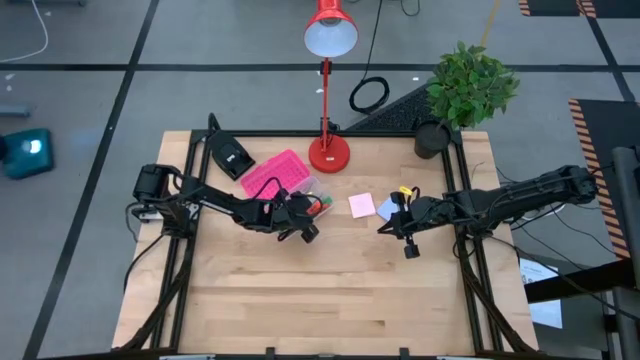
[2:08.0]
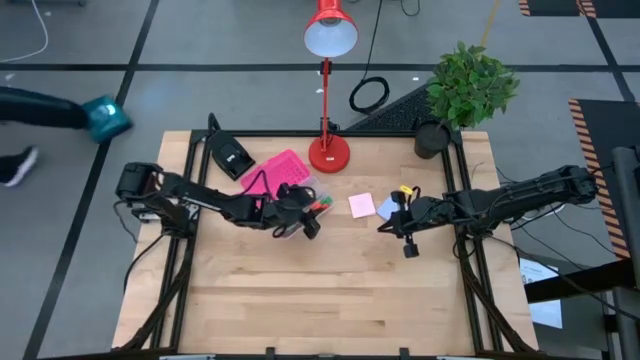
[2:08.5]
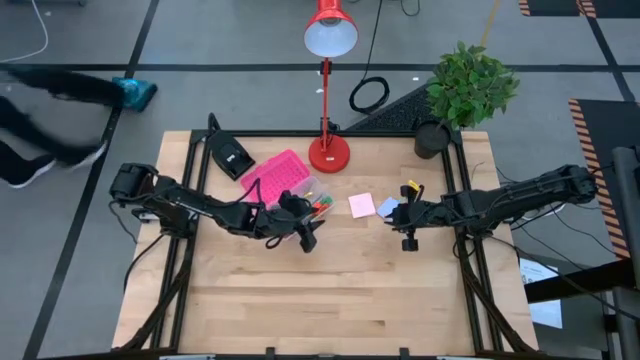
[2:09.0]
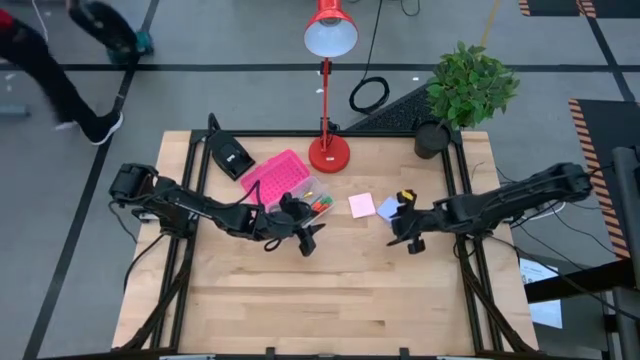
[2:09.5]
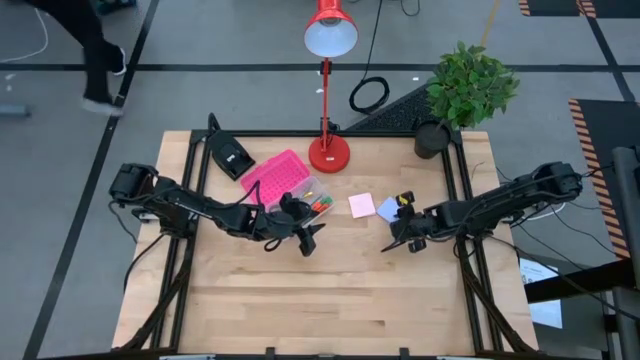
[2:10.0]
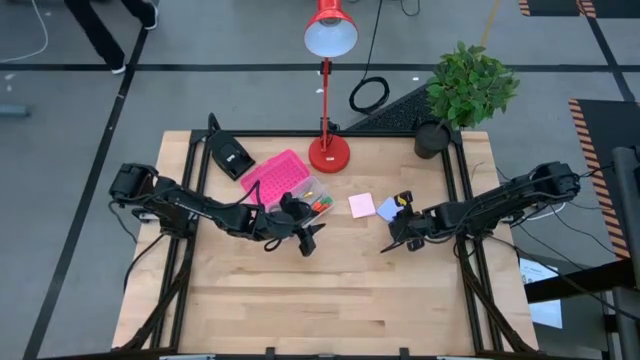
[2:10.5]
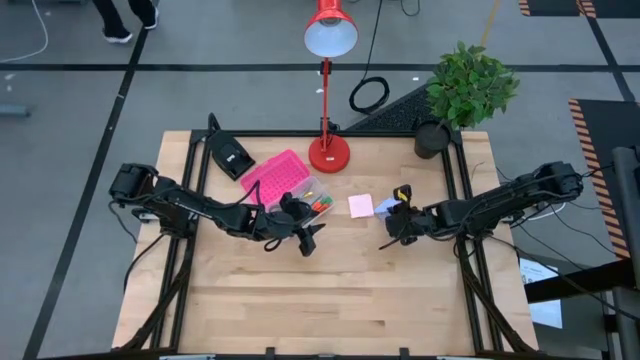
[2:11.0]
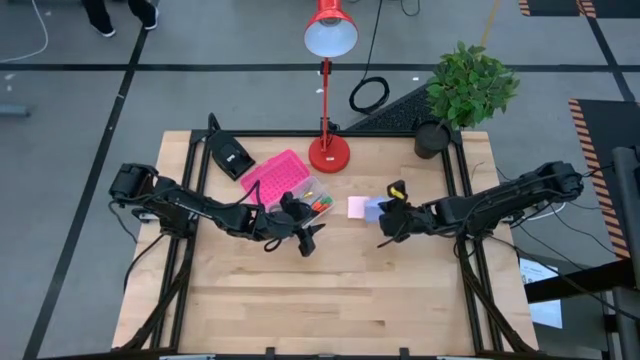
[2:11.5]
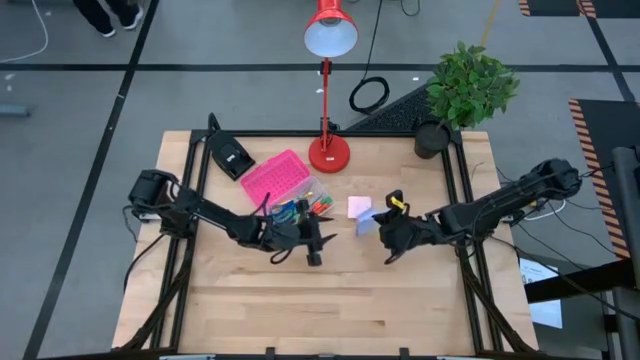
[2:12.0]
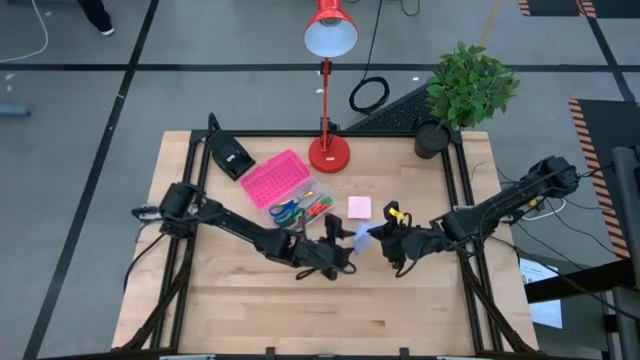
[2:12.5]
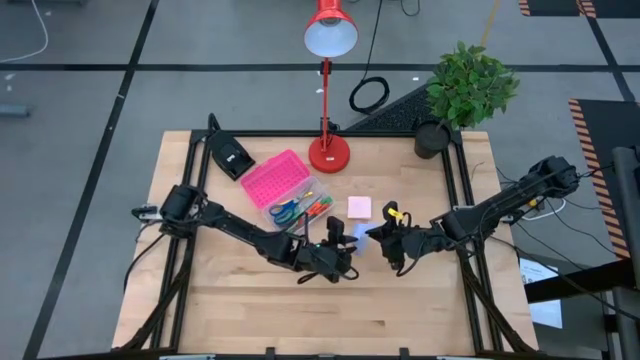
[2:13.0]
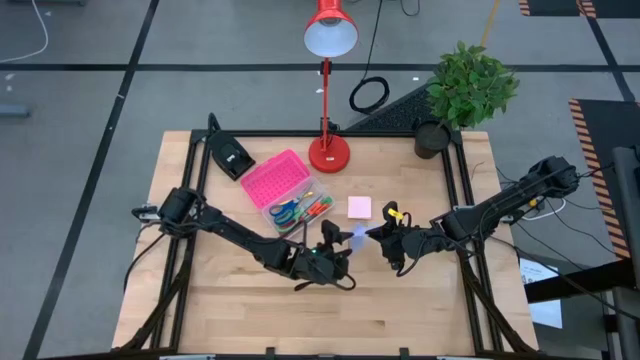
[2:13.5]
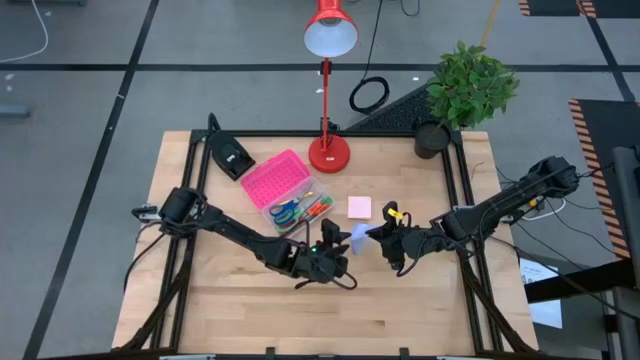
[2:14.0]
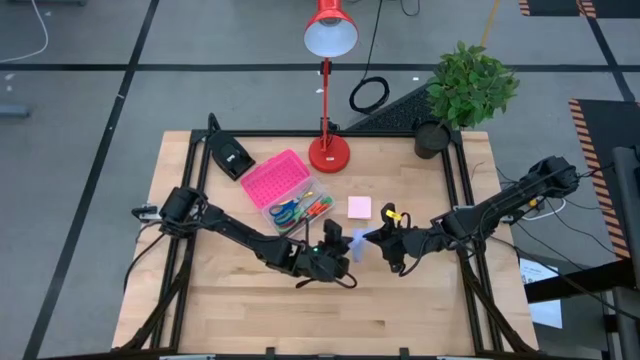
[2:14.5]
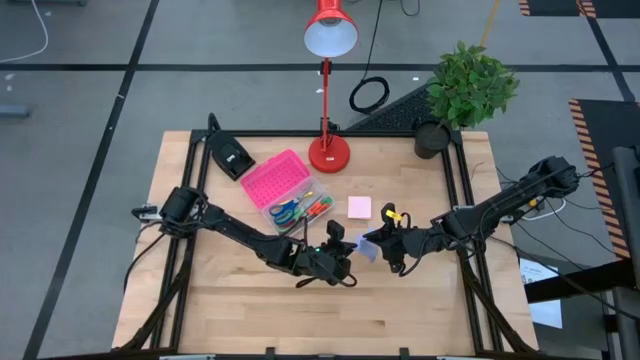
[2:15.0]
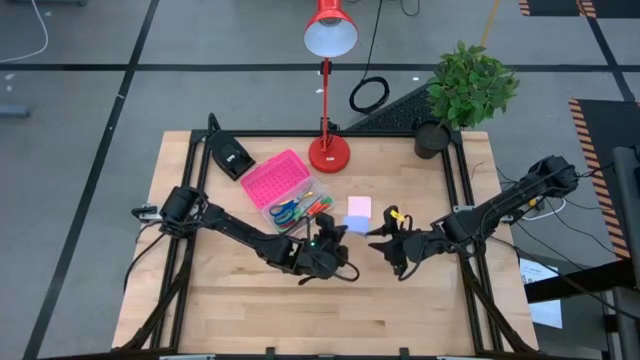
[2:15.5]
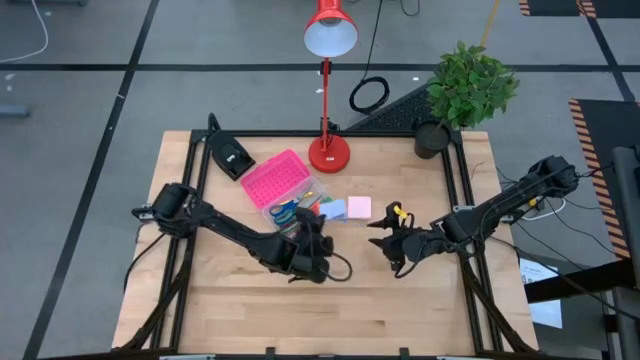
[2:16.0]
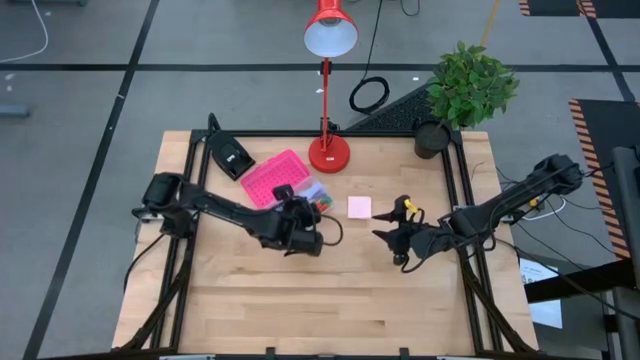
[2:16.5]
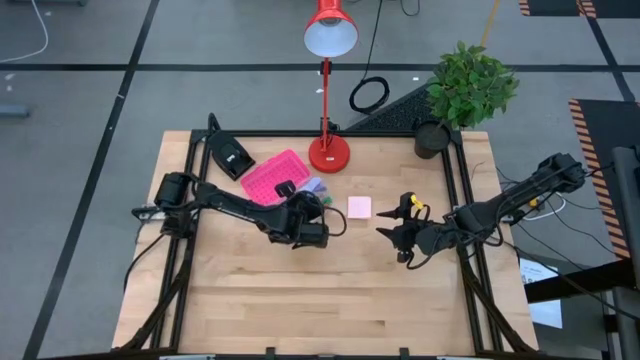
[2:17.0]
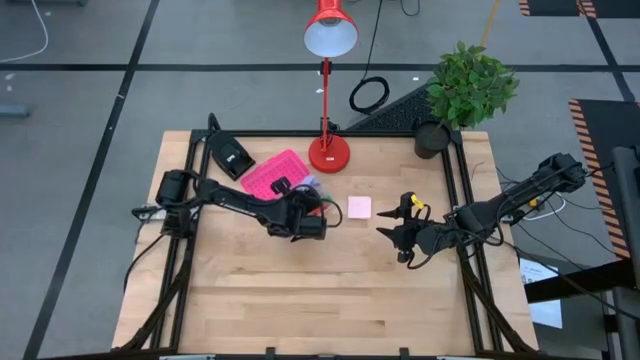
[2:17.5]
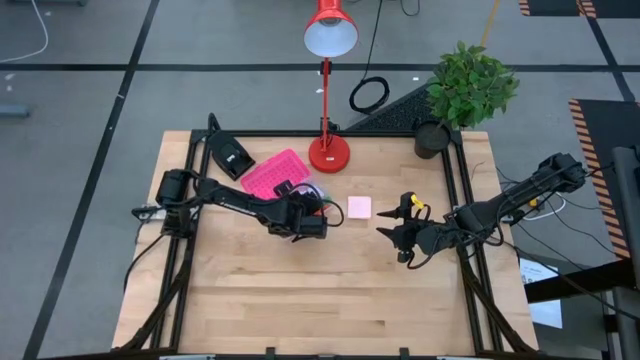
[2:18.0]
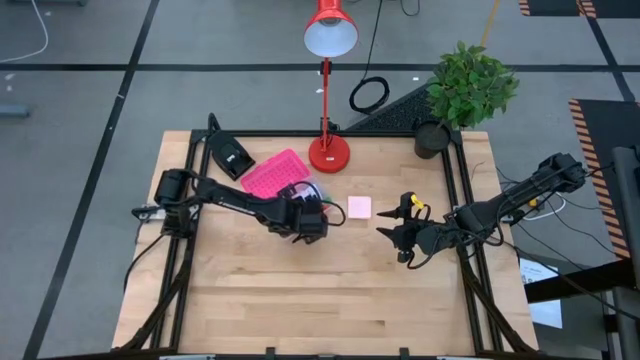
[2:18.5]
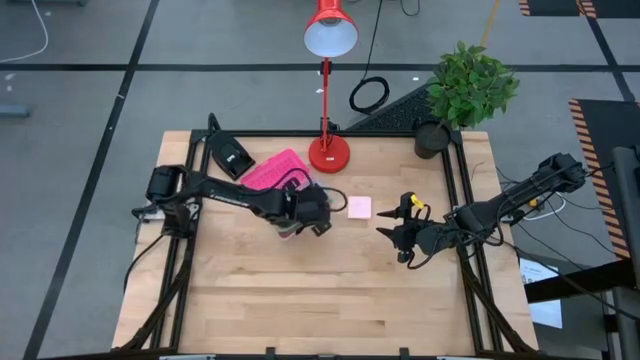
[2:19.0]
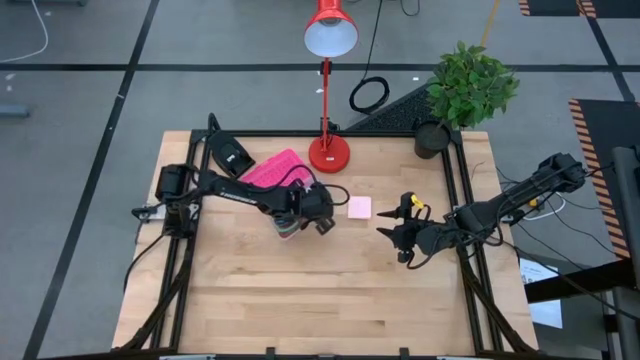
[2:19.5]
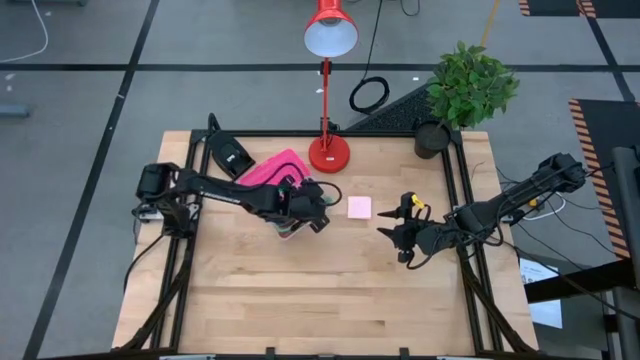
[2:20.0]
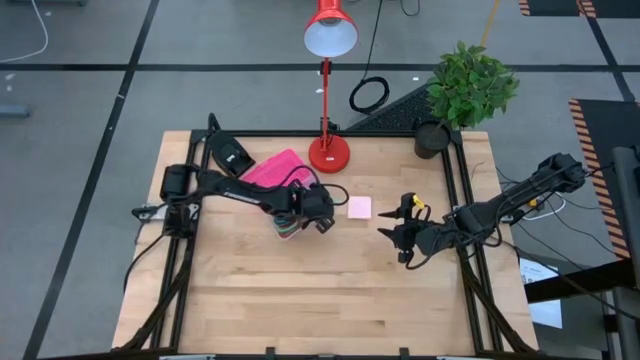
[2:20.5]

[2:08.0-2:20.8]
Task: Pack school essentials
Put the light blue sticky note into the supply box

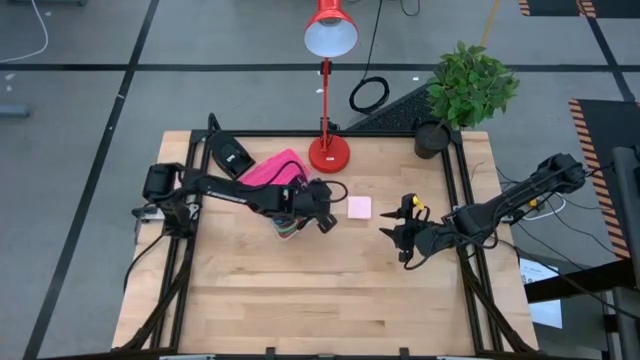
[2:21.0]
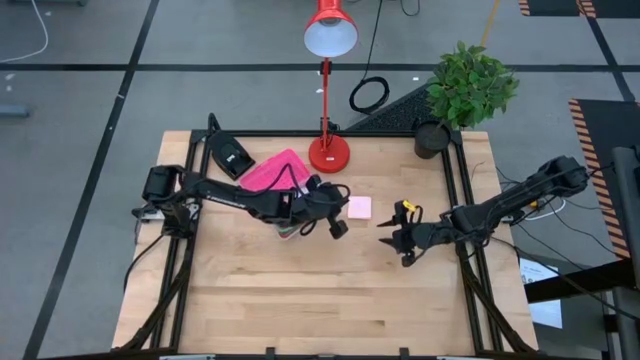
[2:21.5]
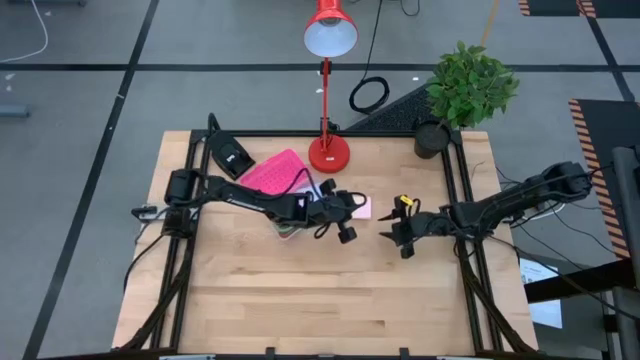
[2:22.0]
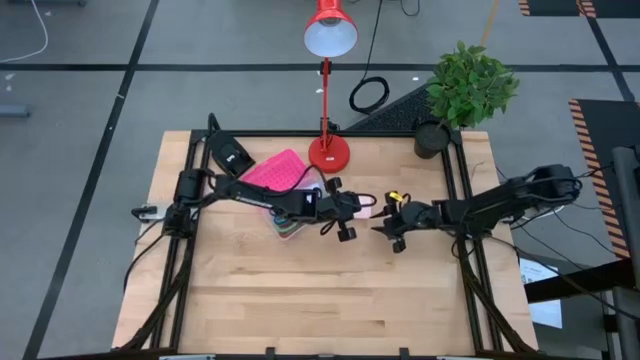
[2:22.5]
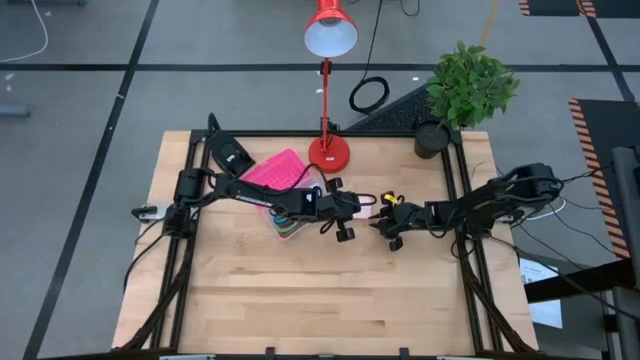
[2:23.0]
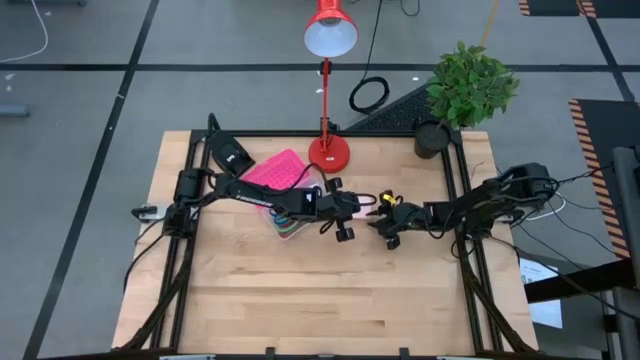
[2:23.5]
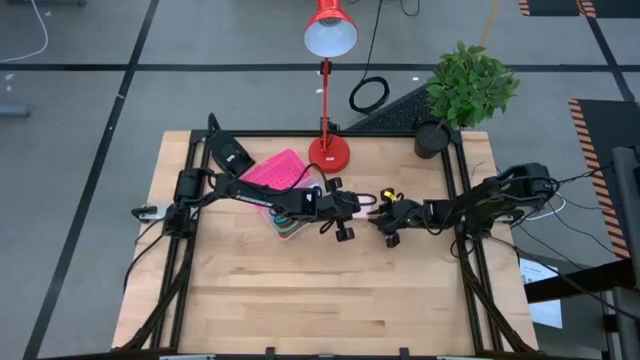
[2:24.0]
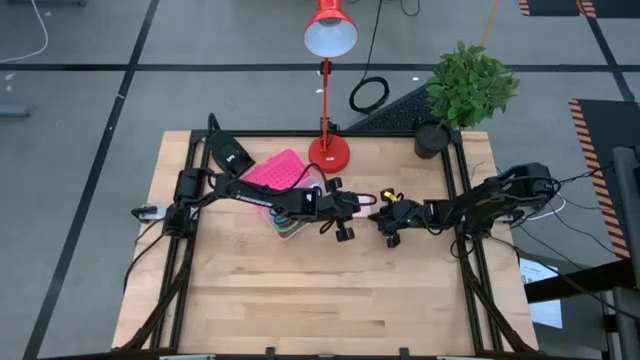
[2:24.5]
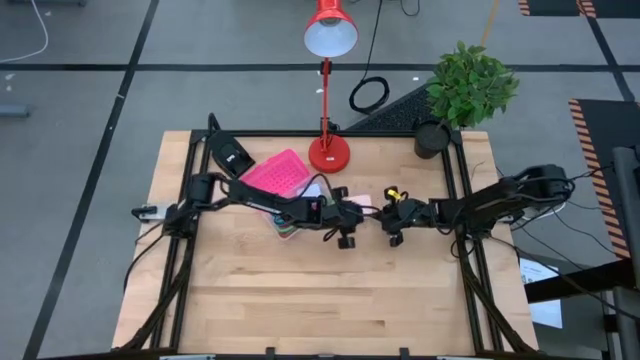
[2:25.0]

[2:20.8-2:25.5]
Put the pink sticky note into the pink supply box

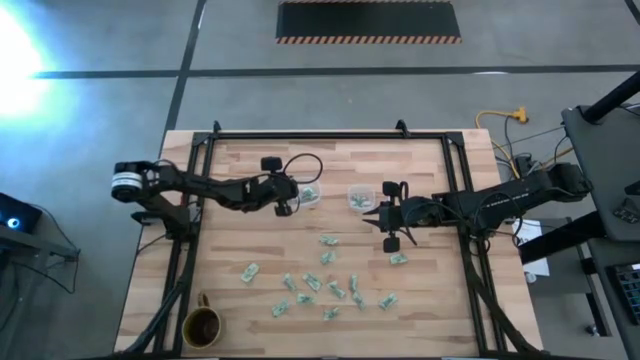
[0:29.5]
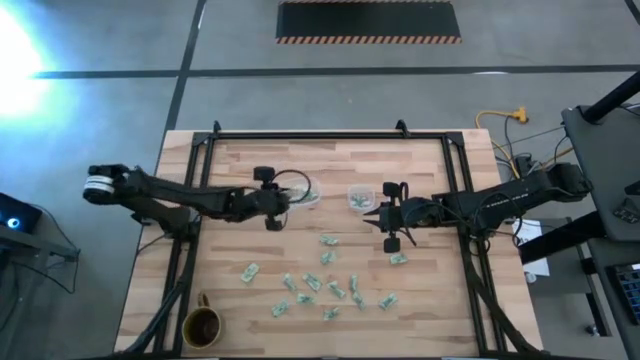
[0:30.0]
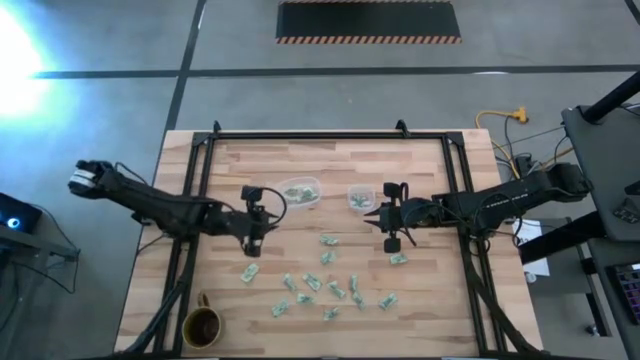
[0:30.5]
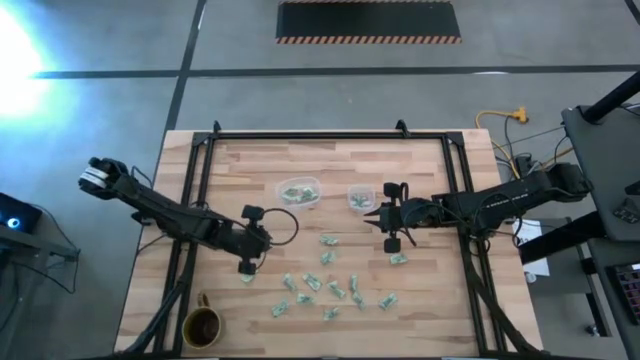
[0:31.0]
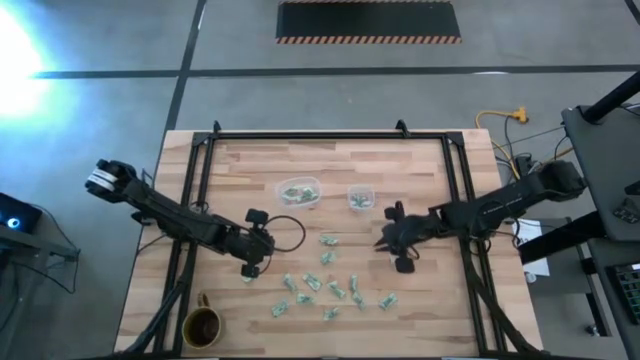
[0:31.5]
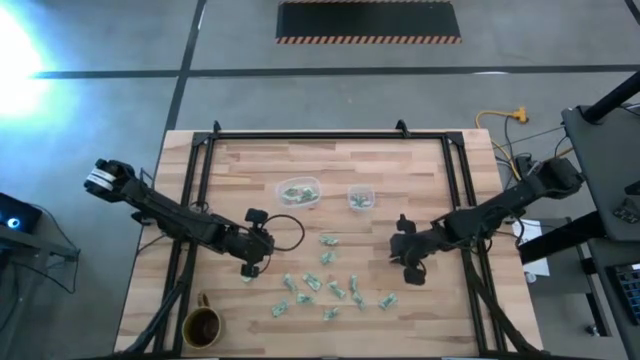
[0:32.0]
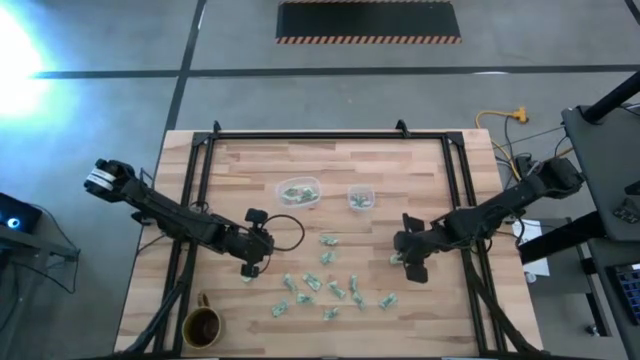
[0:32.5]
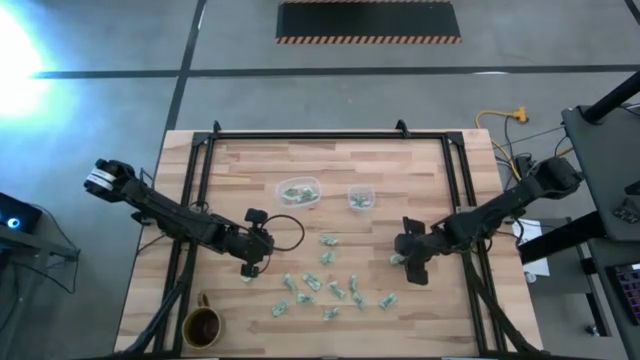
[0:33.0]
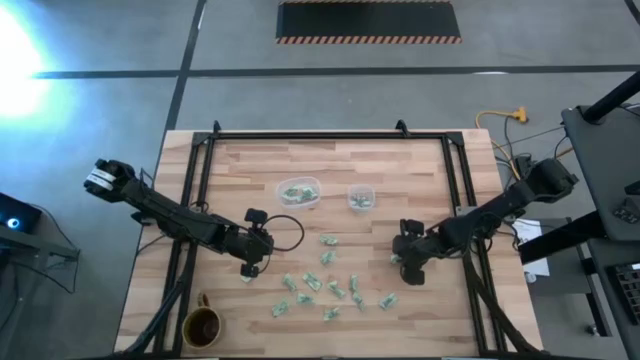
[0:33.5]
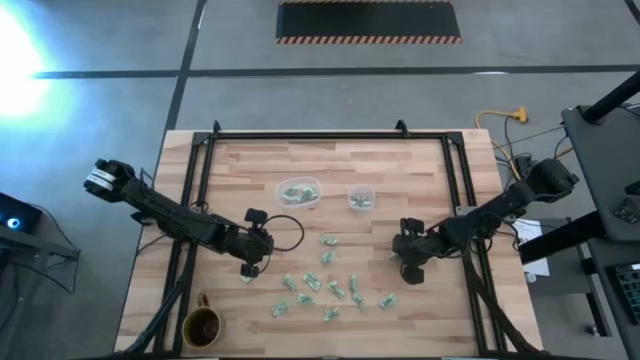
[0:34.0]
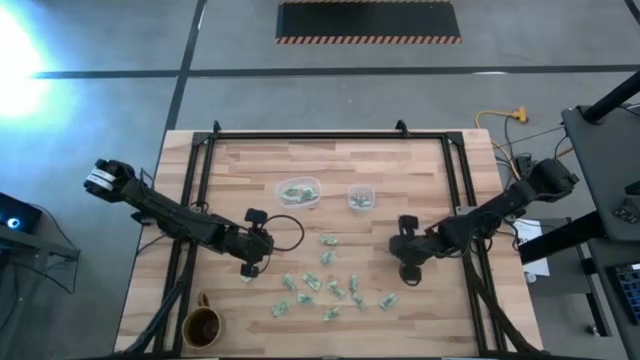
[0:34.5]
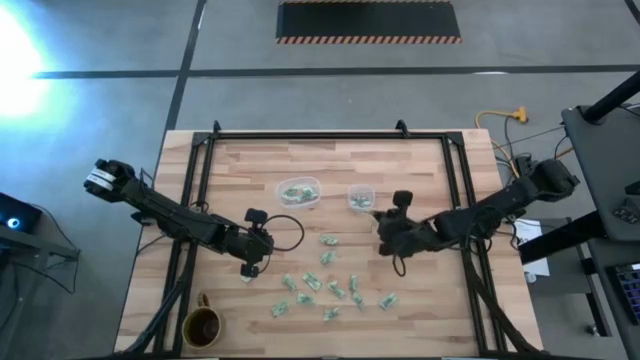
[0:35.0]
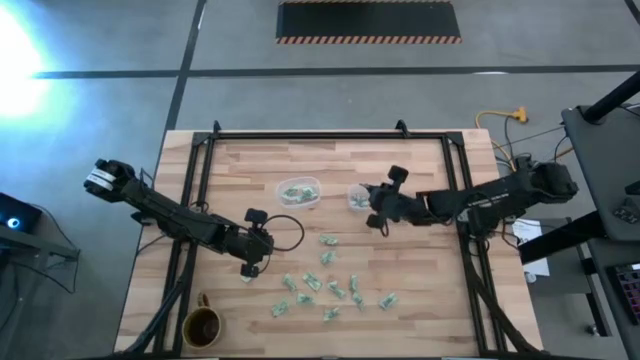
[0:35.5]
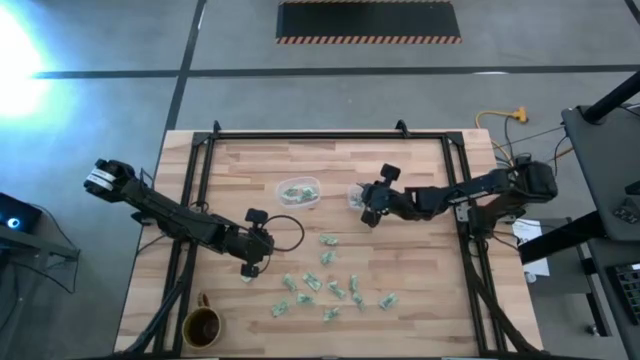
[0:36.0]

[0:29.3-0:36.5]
Task: Pick and place Stevia / Truvia into bins
Put the stevia packet into the transparent square container
